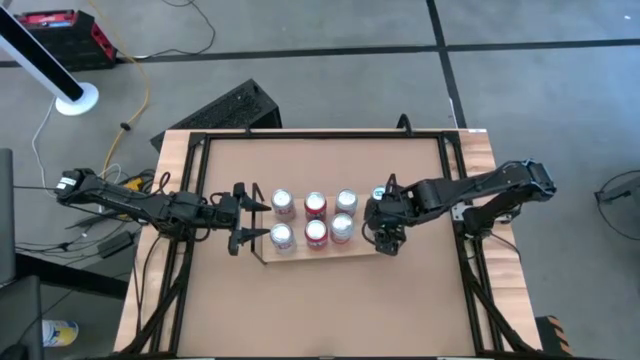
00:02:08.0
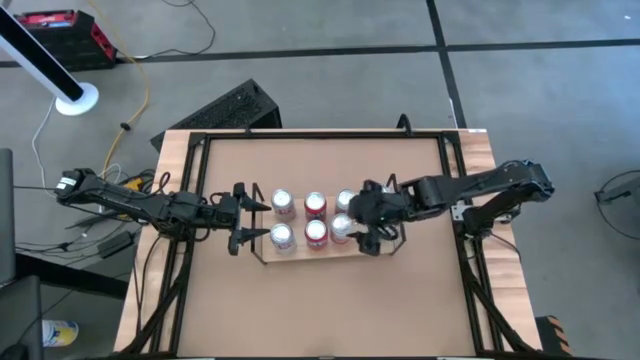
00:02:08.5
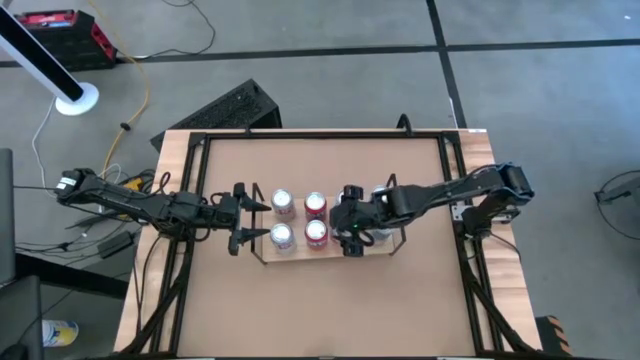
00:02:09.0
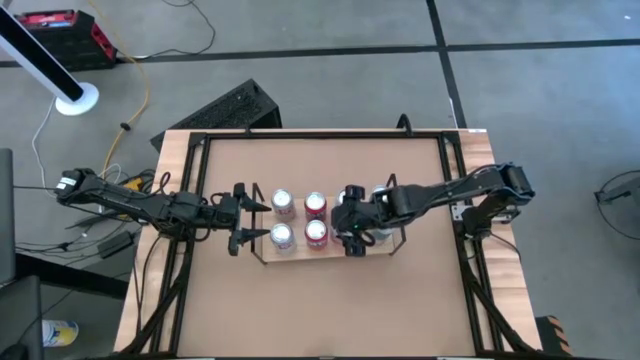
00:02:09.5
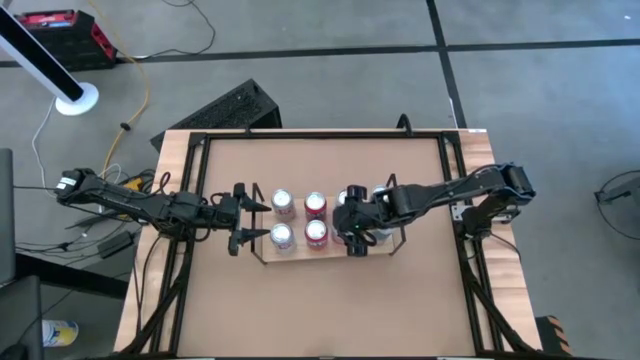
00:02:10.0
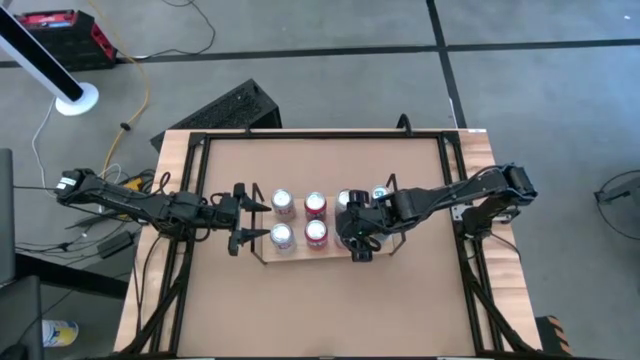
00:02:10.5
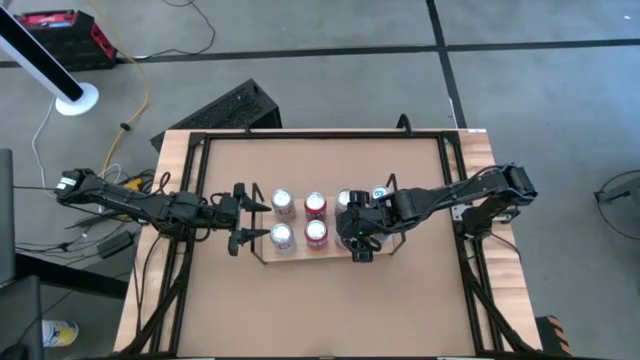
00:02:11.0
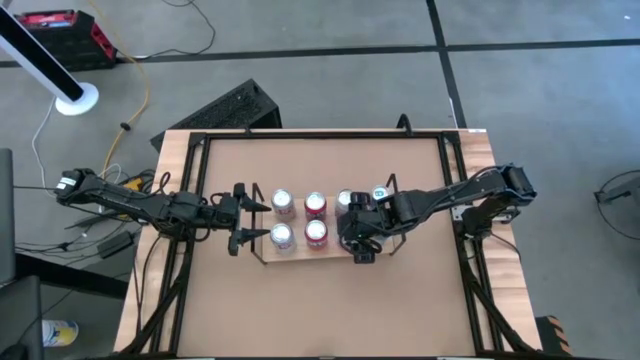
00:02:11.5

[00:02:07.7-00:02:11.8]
Task: Place canned beverage on shelf
Adjust the pink soda can on the shelf

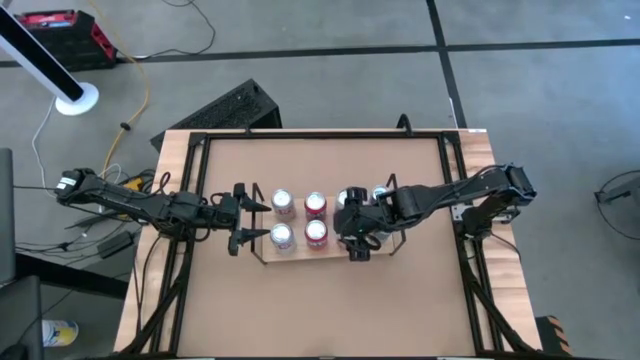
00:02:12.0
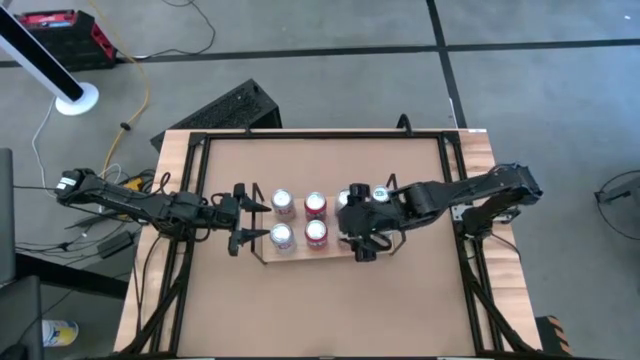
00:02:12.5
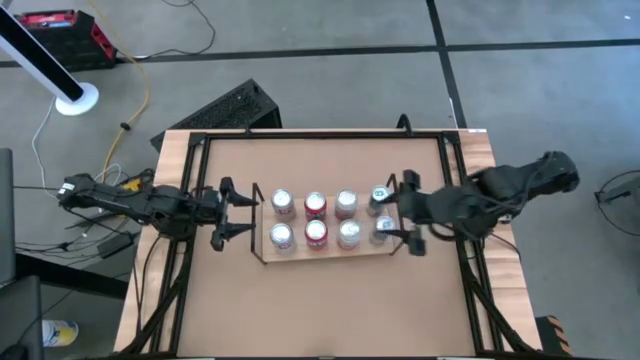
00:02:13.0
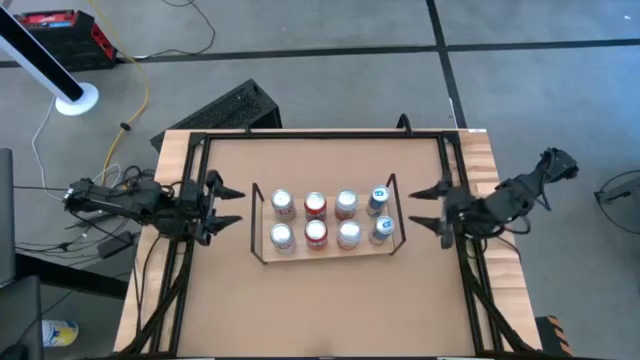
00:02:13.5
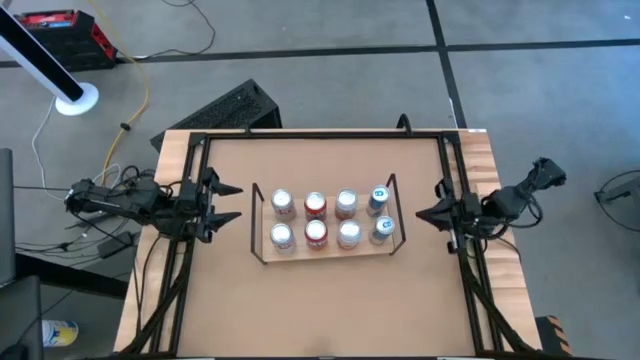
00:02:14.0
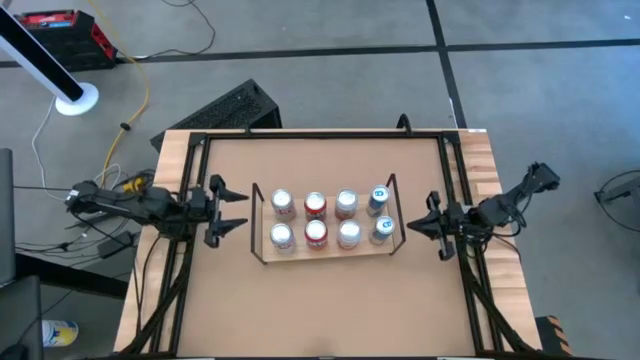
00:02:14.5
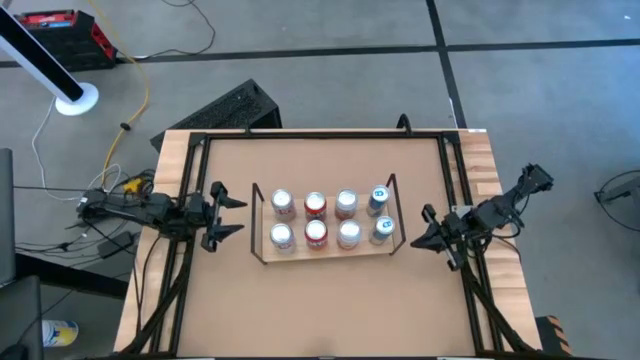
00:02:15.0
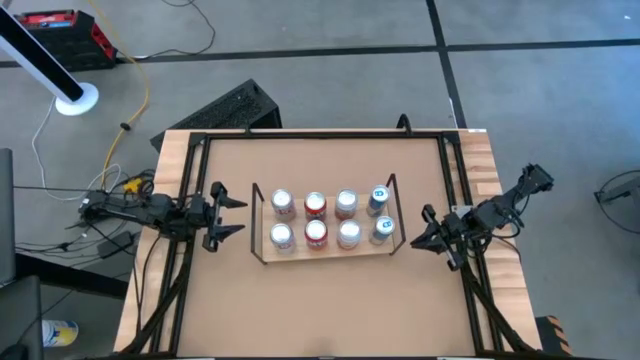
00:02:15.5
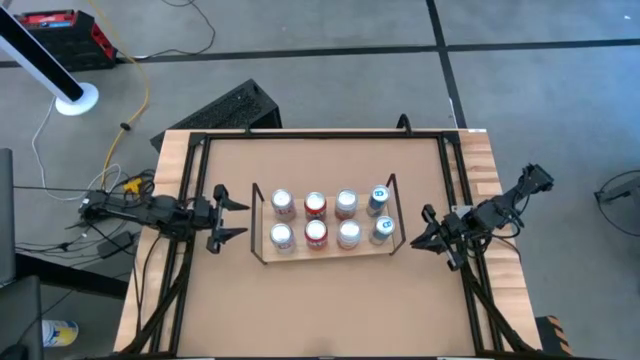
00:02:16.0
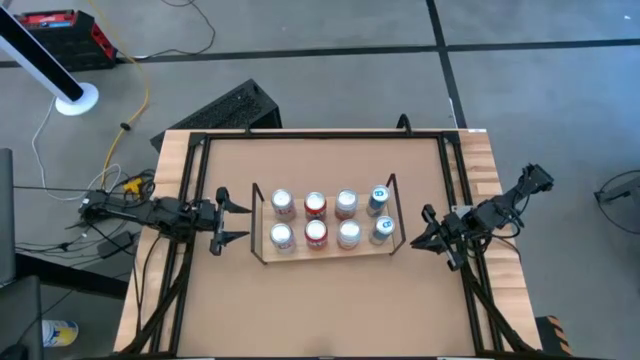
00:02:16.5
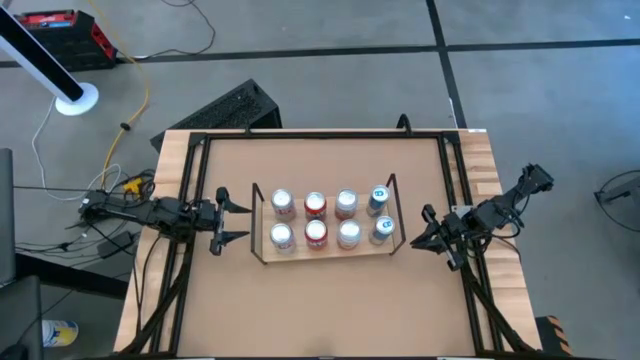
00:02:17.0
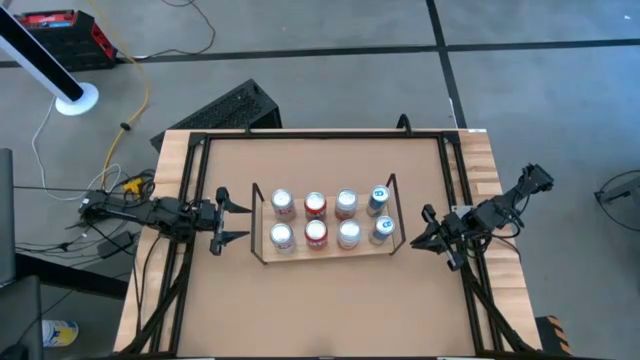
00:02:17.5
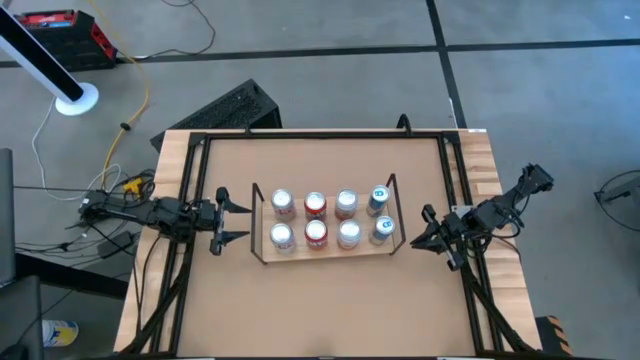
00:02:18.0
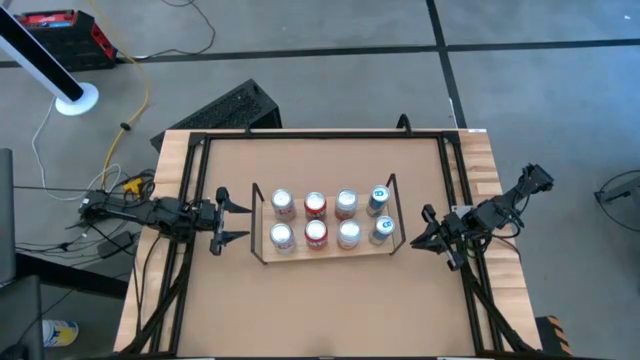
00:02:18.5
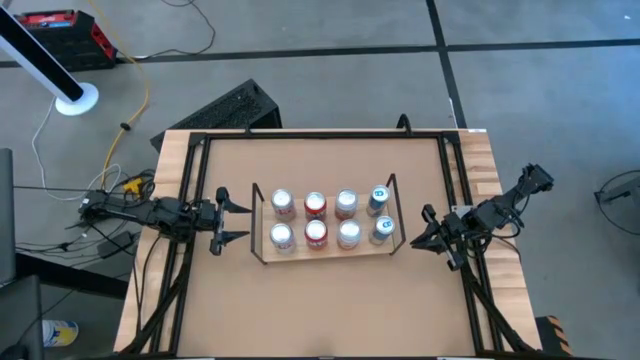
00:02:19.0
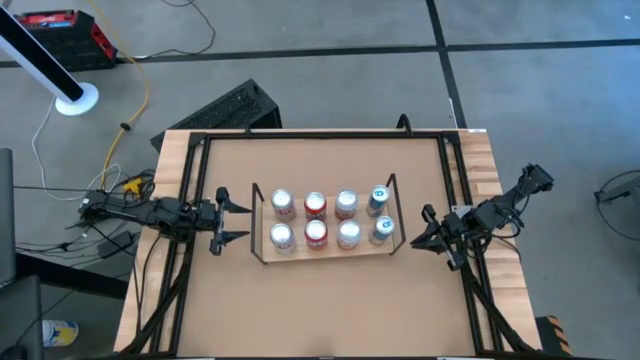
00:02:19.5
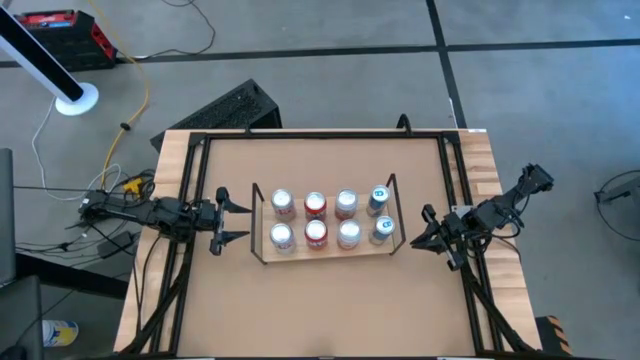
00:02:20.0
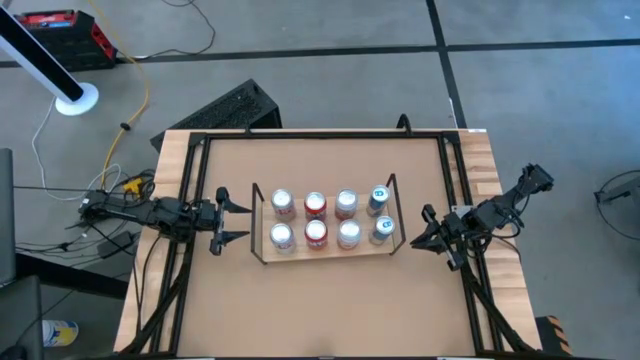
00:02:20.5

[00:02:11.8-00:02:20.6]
Return to Home Position

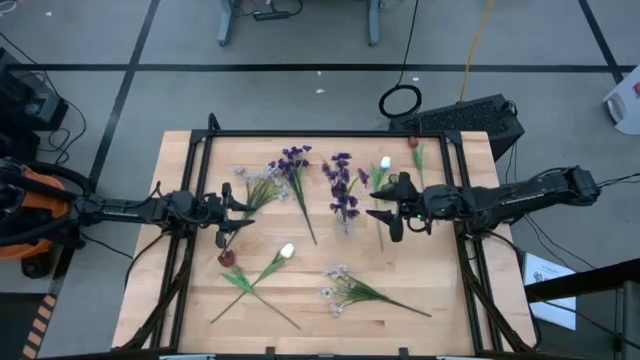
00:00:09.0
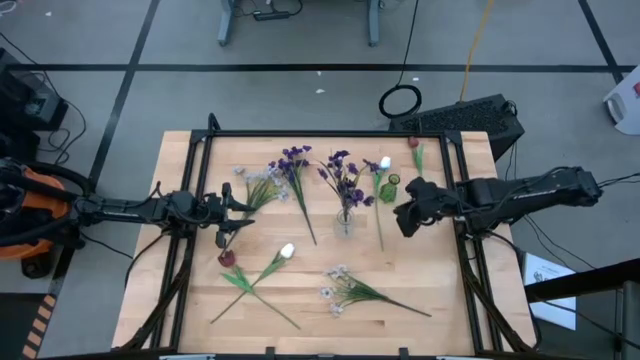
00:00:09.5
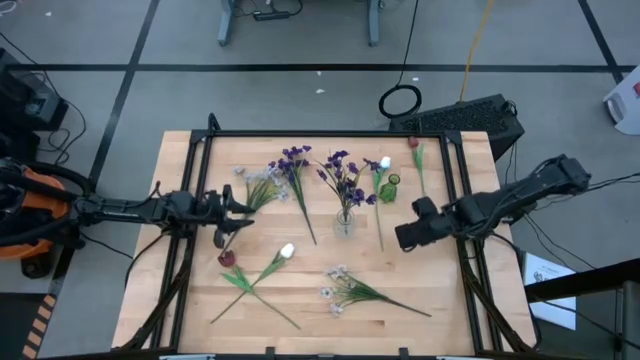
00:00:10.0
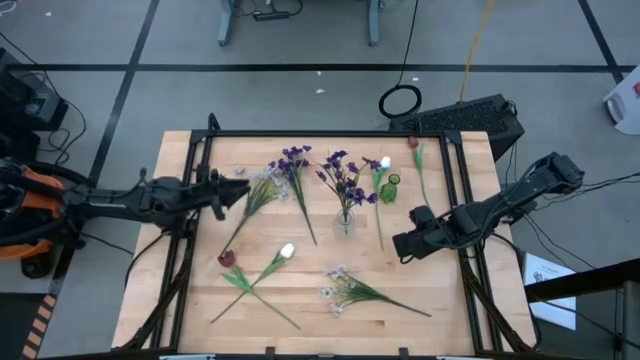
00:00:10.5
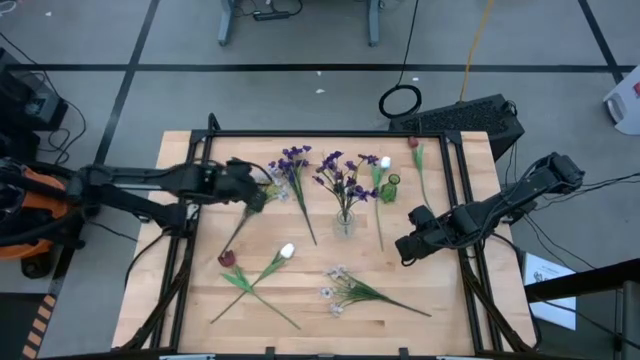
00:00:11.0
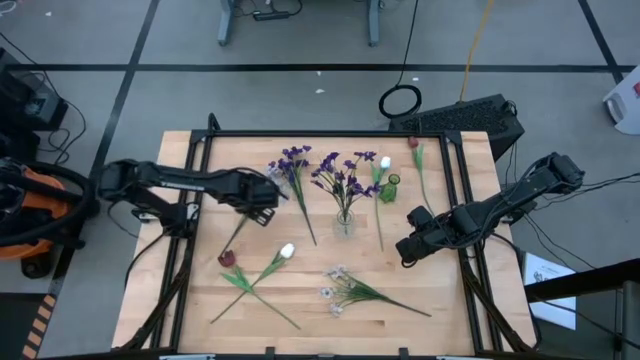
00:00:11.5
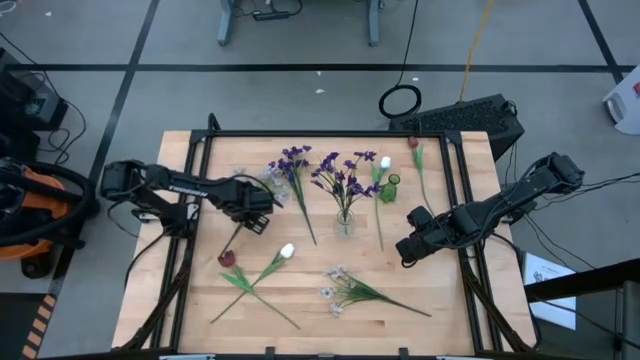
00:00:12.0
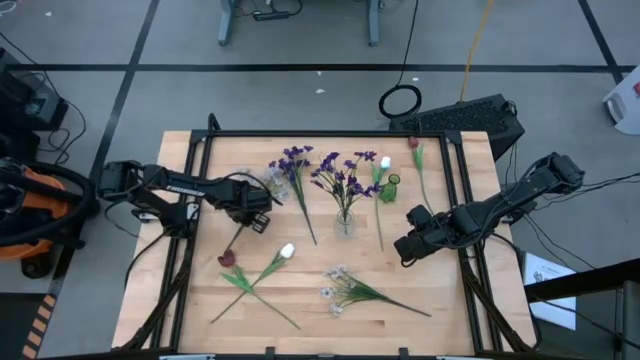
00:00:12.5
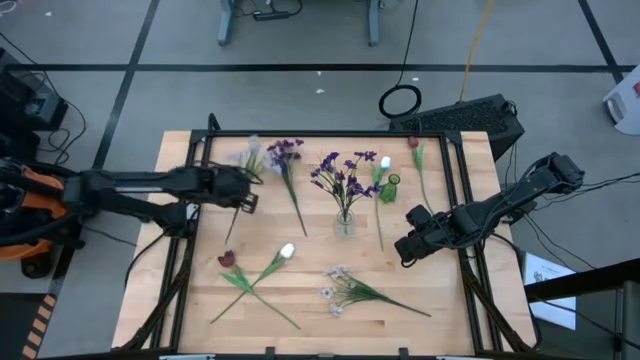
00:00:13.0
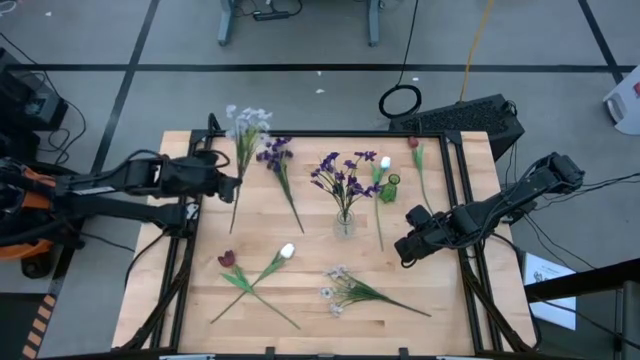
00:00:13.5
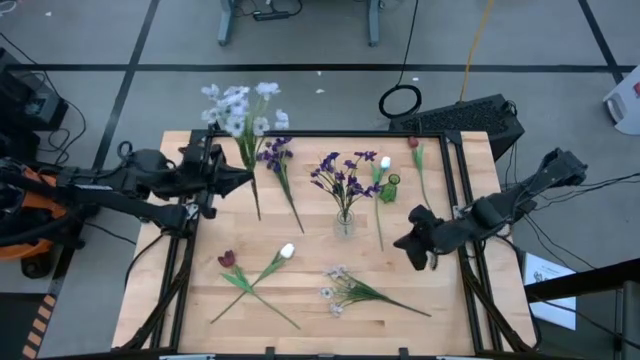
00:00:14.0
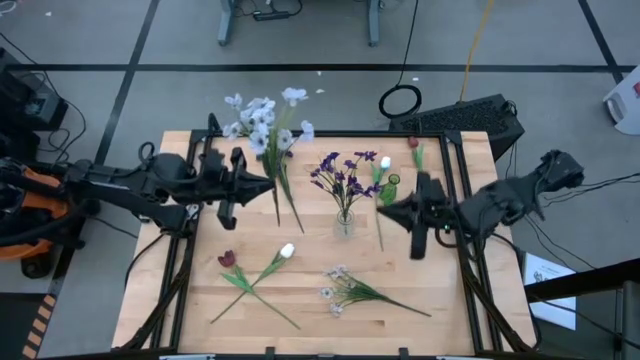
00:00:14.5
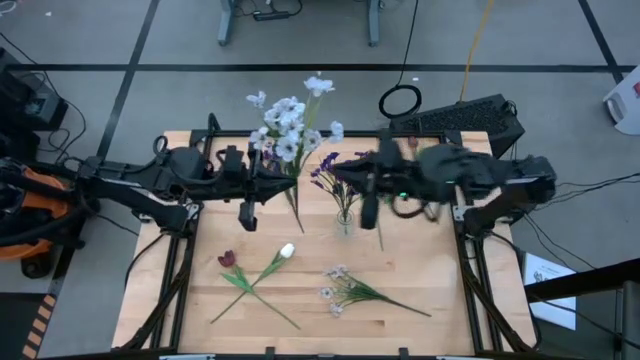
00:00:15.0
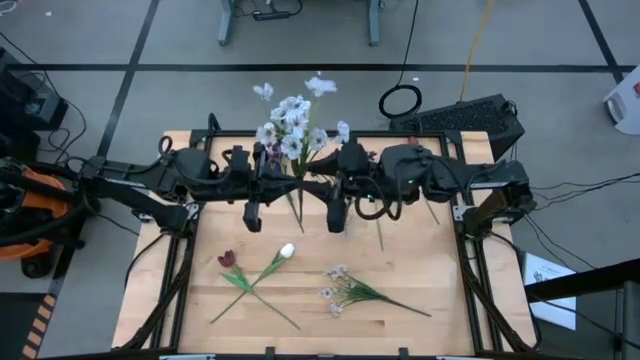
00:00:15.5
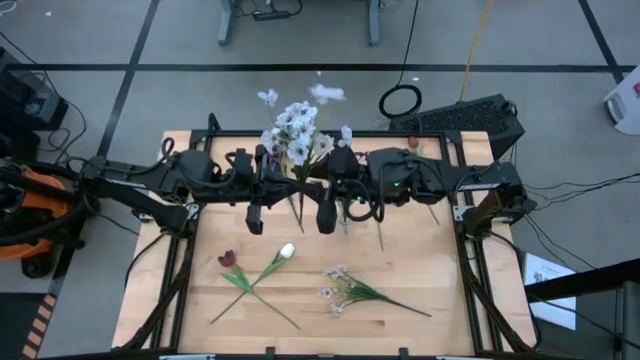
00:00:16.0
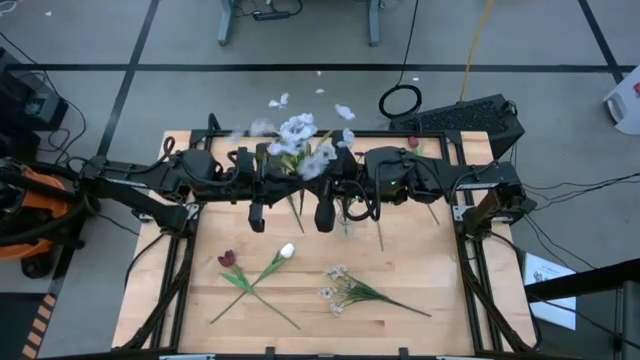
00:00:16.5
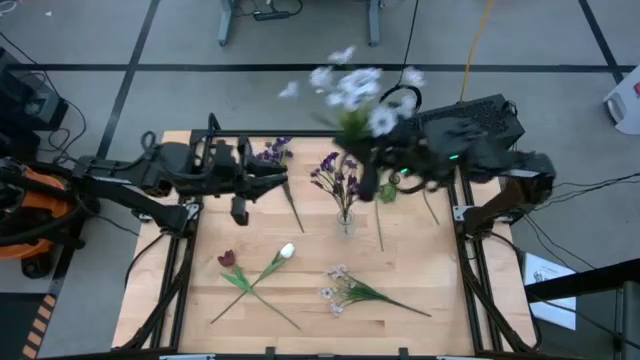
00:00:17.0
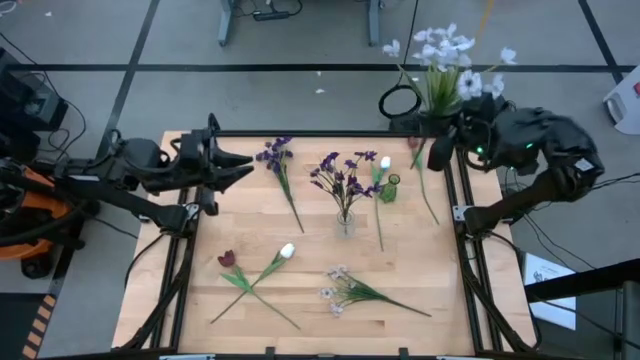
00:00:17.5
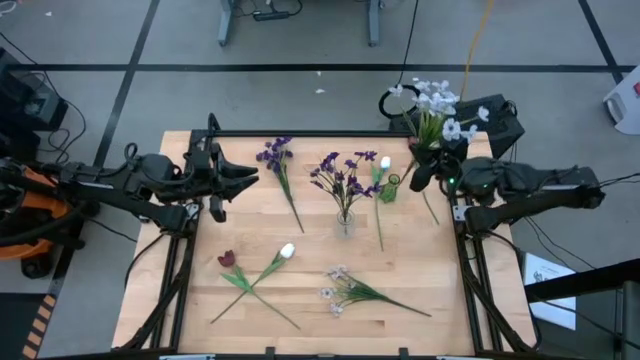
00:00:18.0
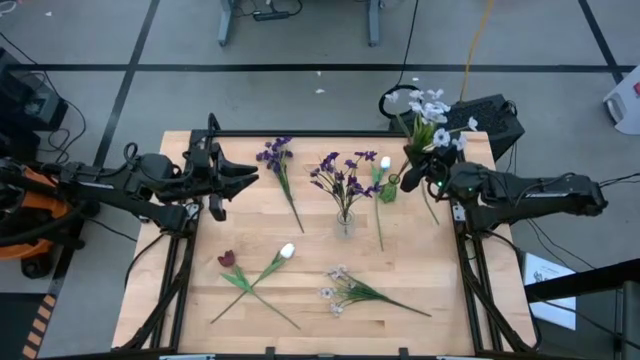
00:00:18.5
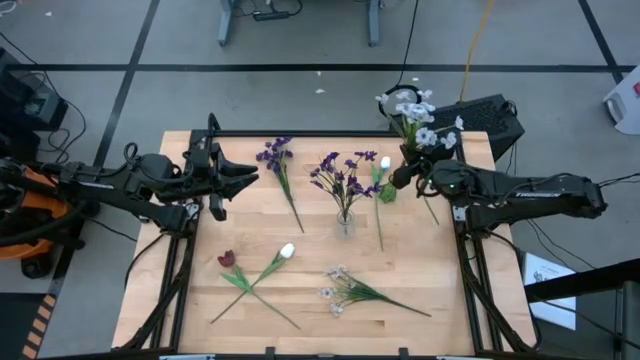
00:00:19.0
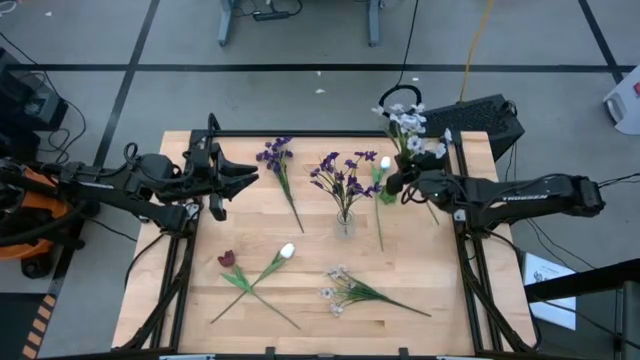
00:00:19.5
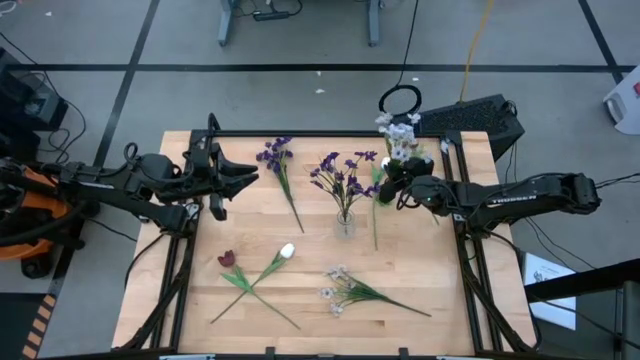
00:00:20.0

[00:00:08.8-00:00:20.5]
Task: Sort flowers into vase by color
Put the top white flowers into the transparent green vase
